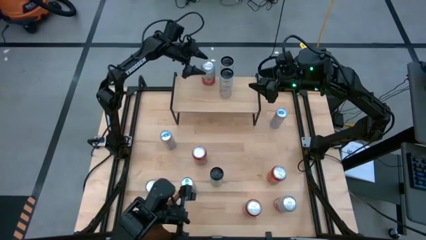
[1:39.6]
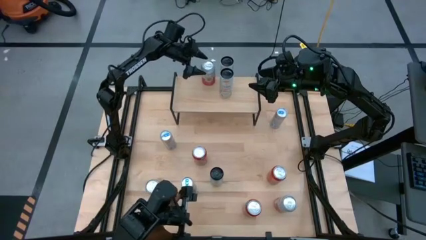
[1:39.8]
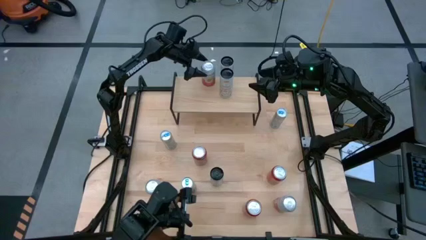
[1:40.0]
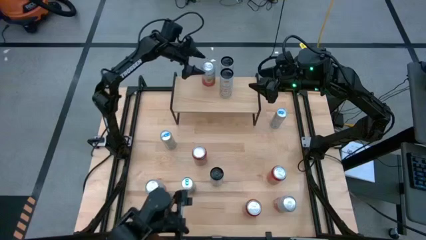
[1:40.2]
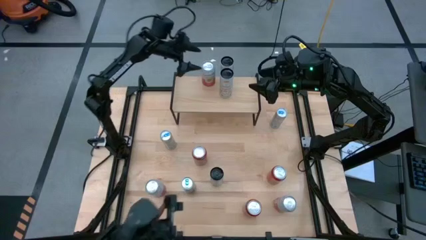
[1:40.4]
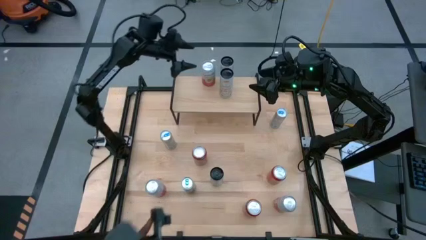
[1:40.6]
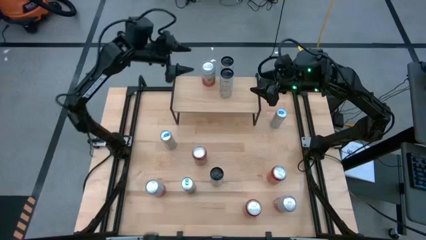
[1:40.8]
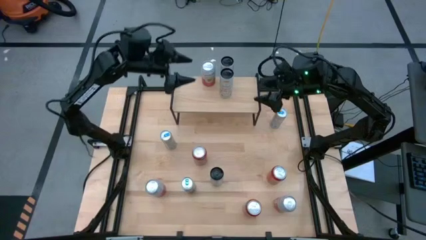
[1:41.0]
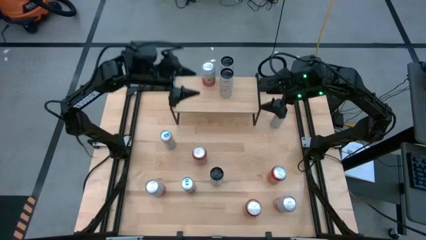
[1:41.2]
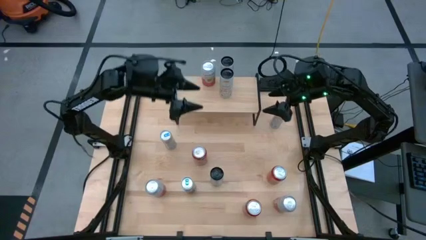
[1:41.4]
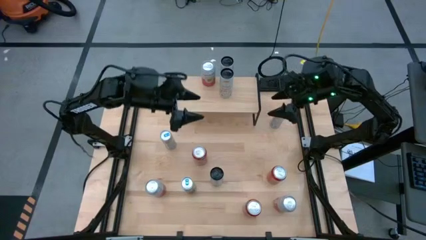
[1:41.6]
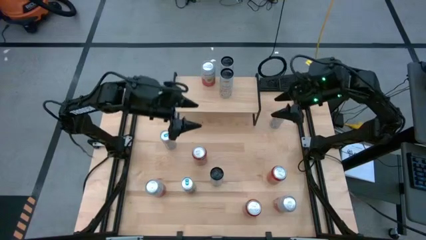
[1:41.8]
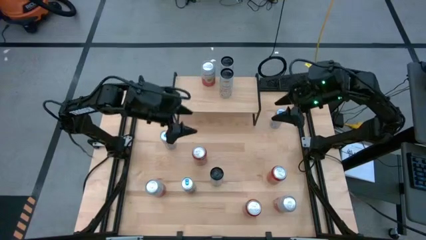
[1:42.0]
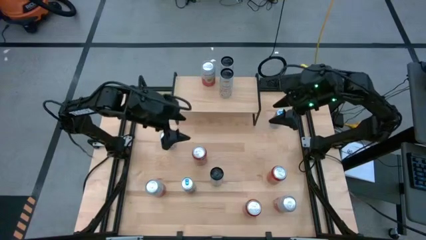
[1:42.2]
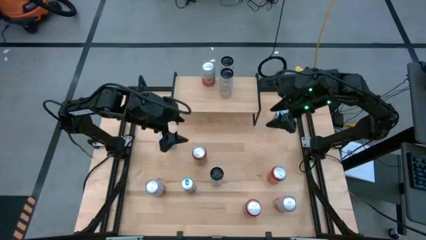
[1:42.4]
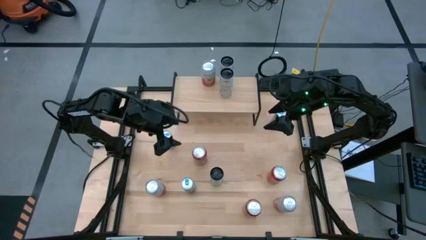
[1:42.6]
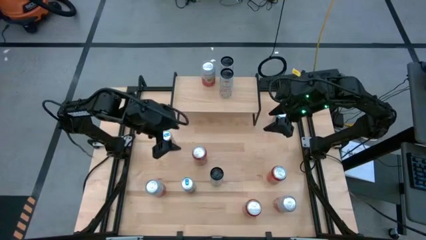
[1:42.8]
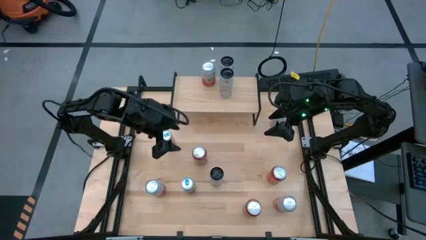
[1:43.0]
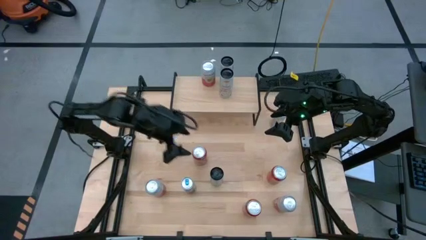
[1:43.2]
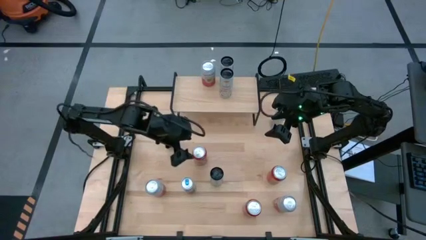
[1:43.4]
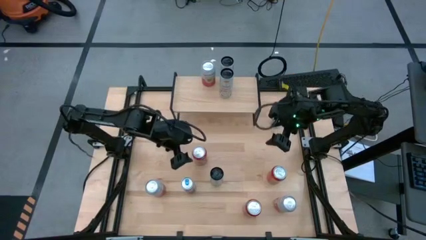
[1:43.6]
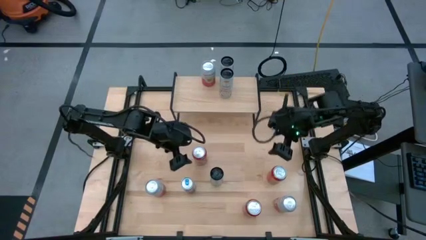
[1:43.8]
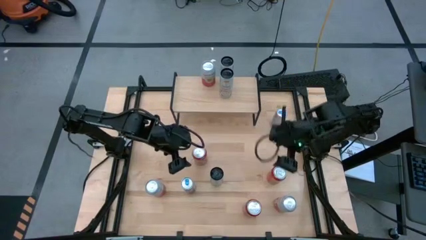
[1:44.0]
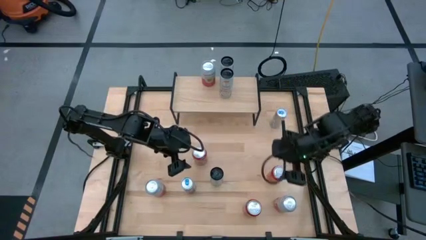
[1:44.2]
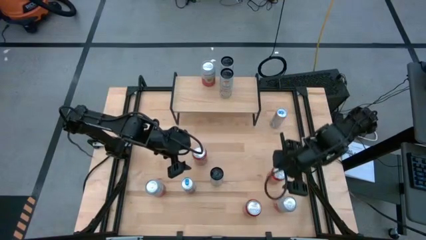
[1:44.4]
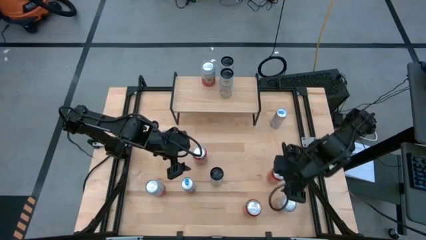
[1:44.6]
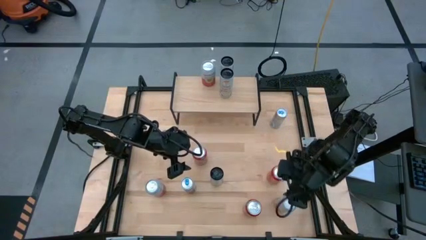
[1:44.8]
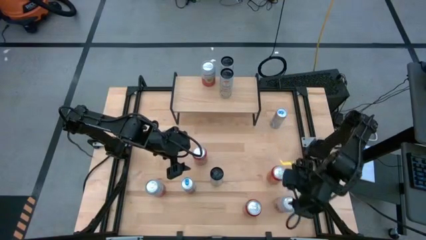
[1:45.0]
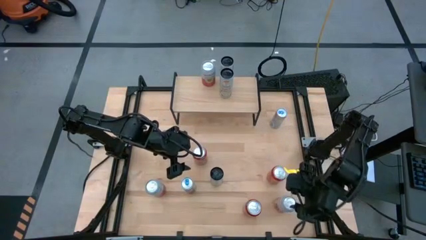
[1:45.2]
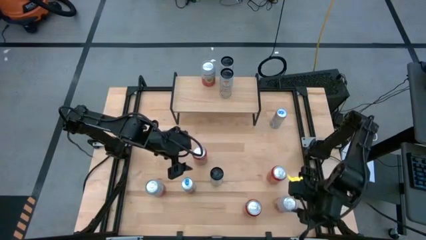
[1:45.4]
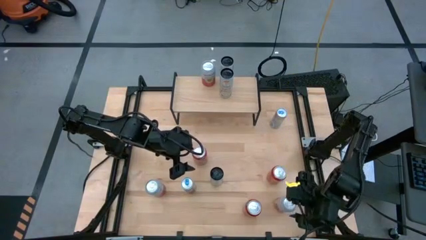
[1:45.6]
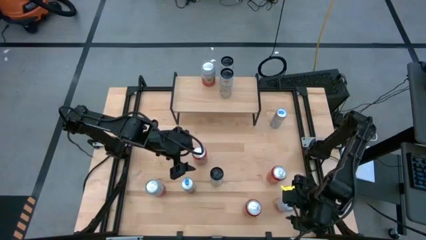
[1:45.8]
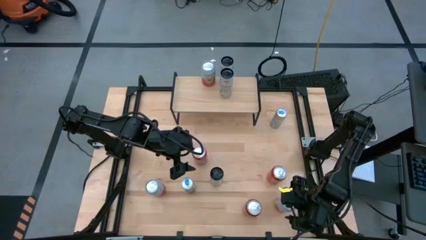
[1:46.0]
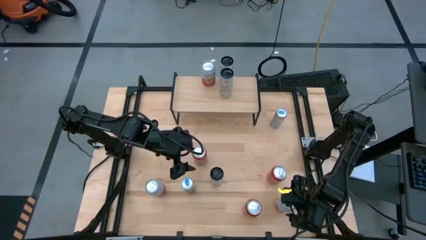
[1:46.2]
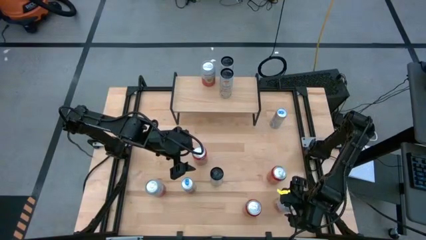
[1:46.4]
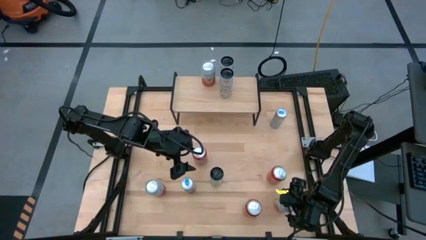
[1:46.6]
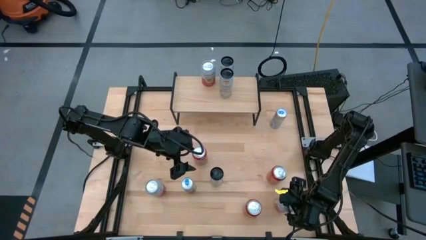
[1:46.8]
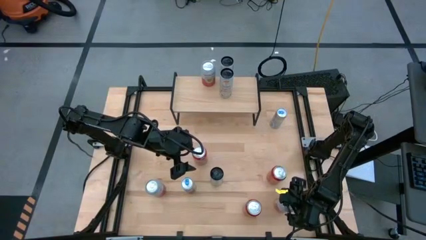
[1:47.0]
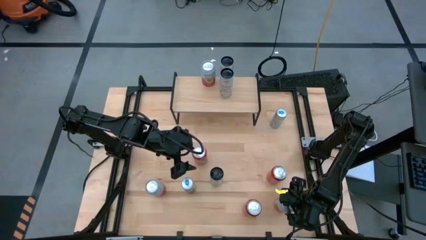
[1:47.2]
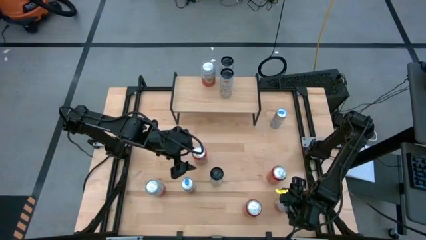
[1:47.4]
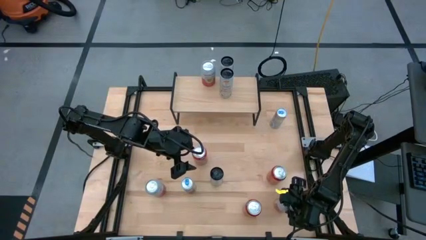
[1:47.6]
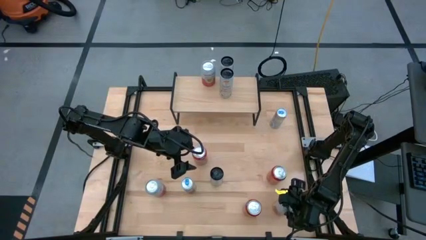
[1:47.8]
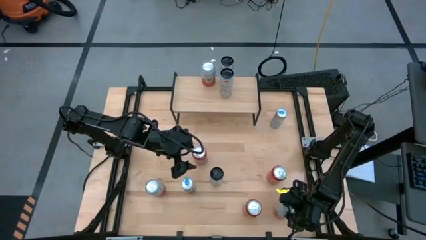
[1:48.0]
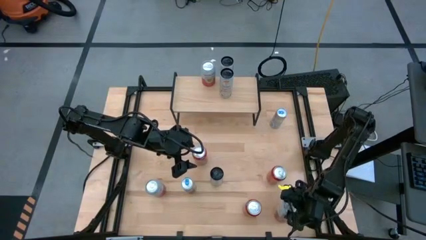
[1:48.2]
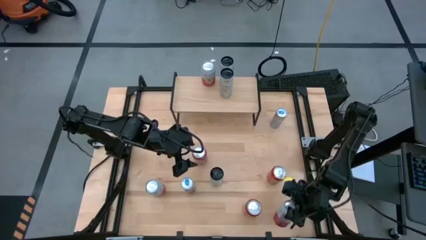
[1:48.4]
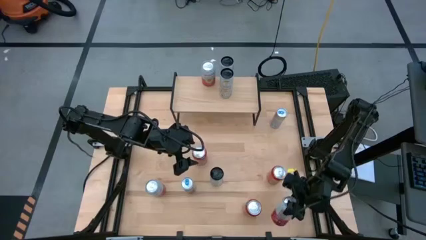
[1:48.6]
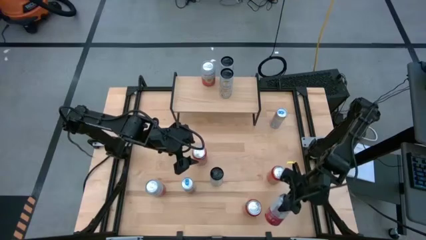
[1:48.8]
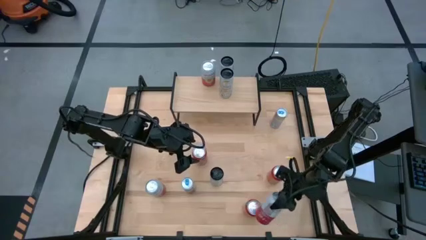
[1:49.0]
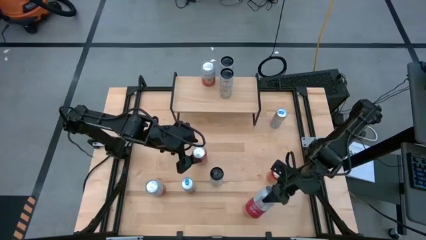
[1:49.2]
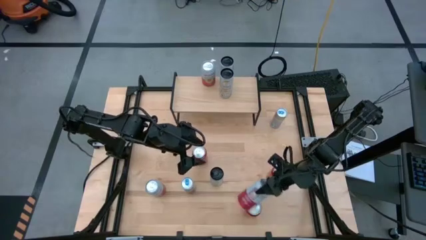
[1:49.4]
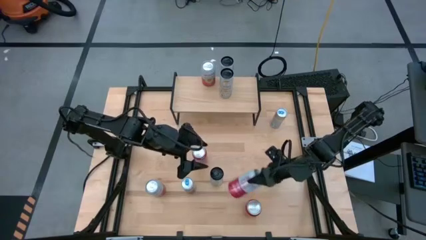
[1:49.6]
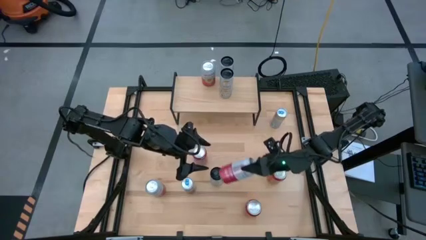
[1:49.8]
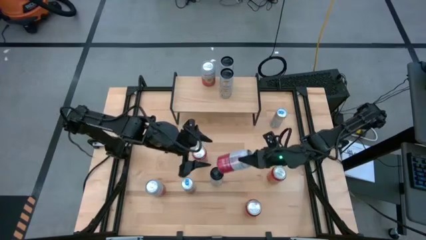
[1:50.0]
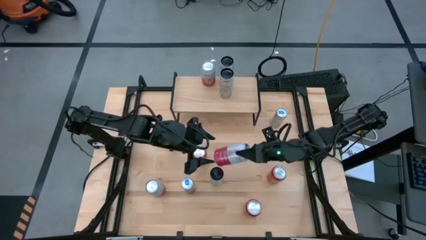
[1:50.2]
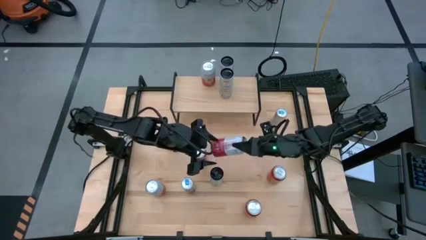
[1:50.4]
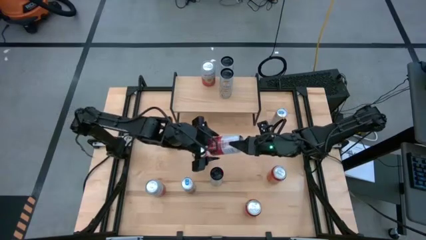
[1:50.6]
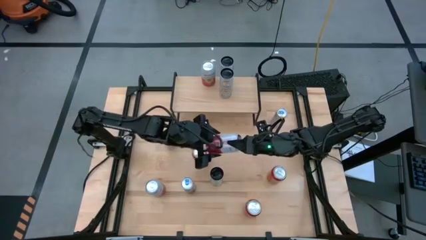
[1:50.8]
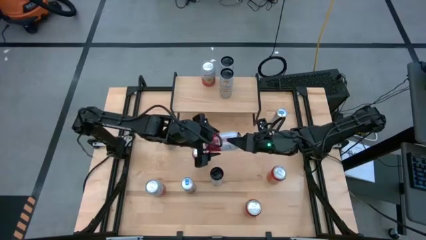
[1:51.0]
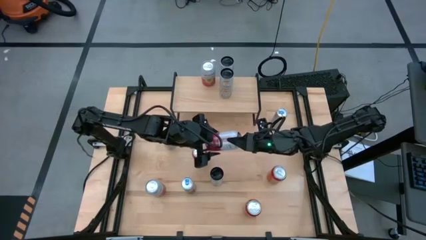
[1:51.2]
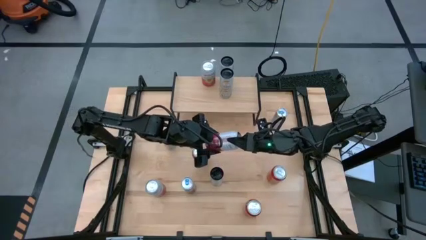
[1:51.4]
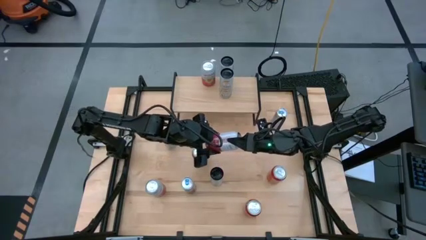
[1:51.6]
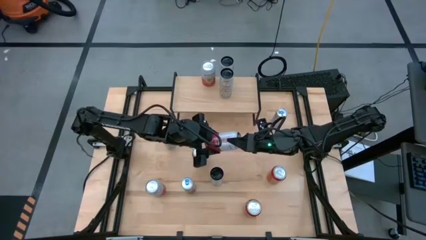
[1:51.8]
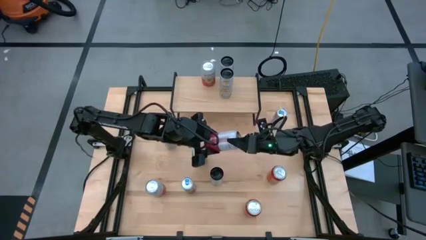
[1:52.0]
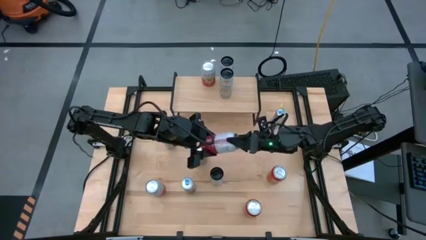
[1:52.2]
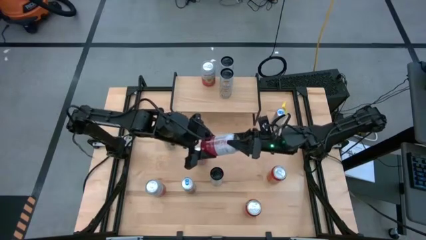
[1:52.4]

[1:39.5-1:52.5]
Task: Place canned beverage on shelf
Put the right pink-white soda can aligned with the other pink-white on the shelf
